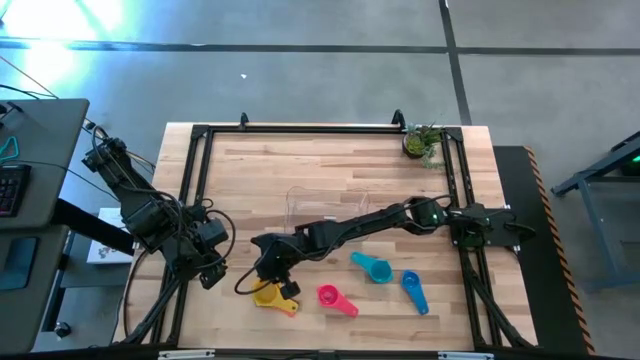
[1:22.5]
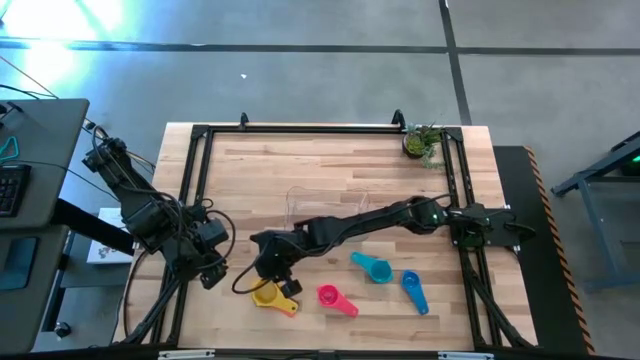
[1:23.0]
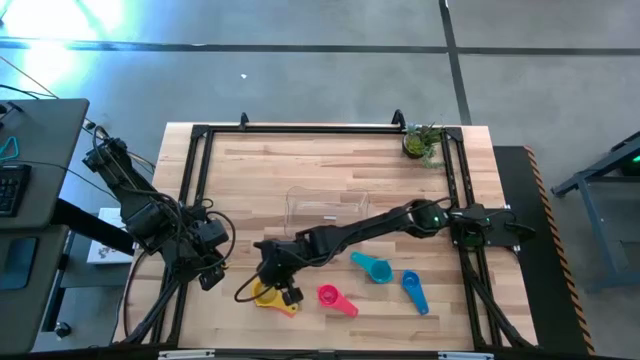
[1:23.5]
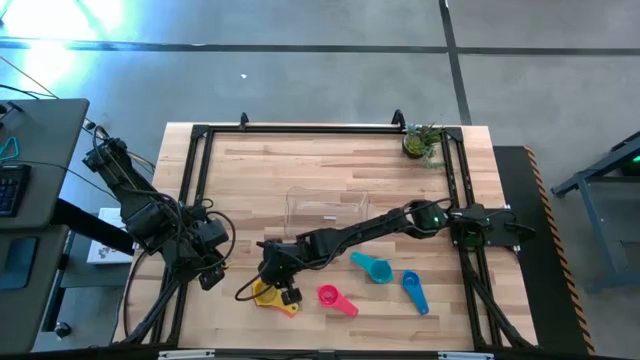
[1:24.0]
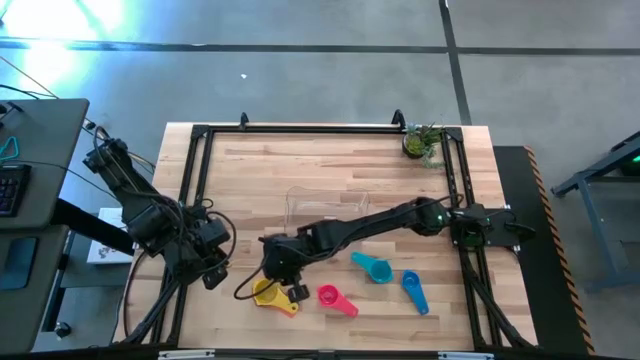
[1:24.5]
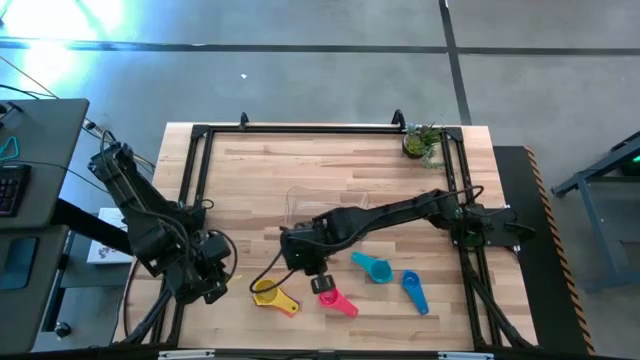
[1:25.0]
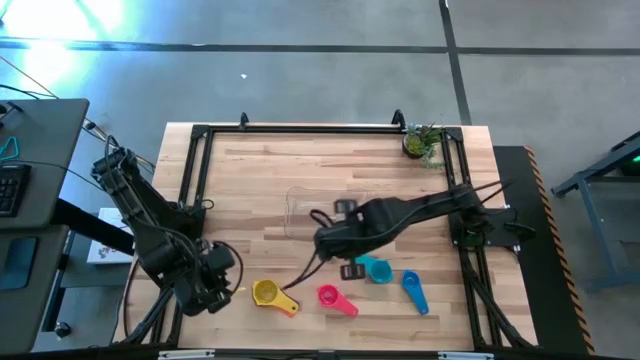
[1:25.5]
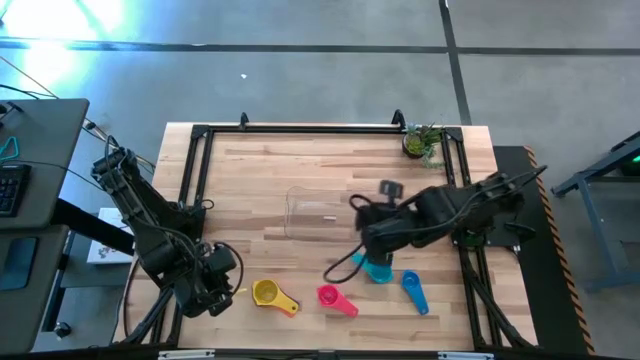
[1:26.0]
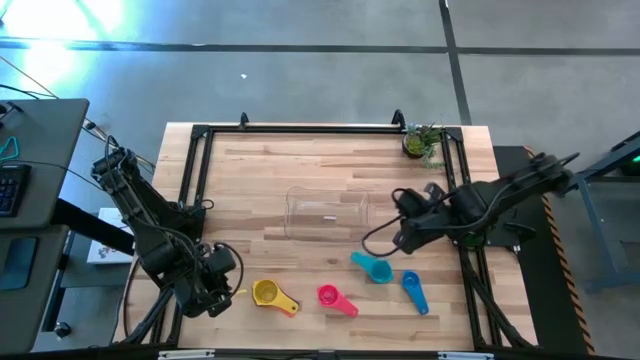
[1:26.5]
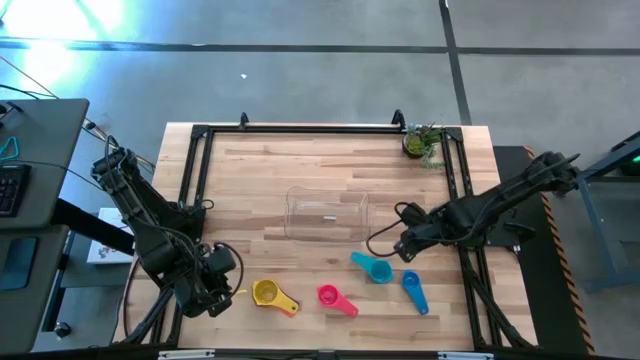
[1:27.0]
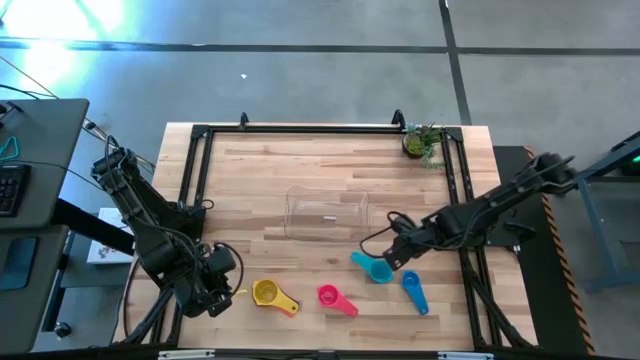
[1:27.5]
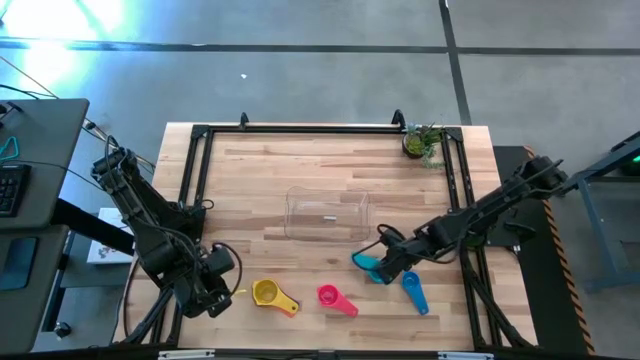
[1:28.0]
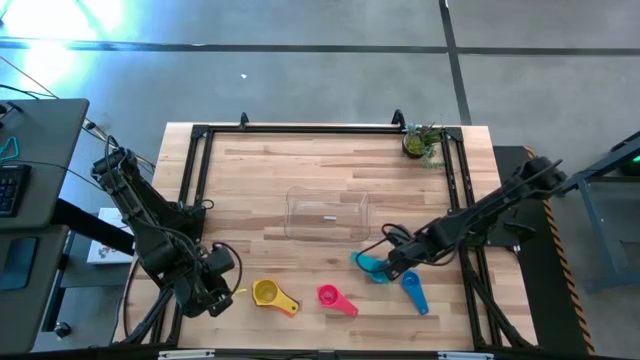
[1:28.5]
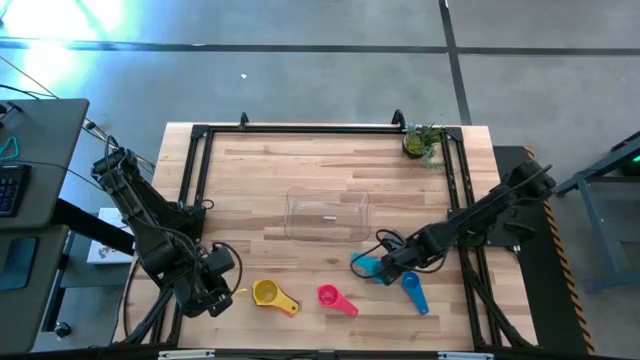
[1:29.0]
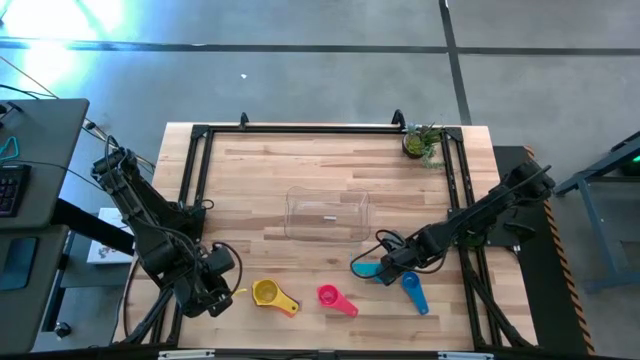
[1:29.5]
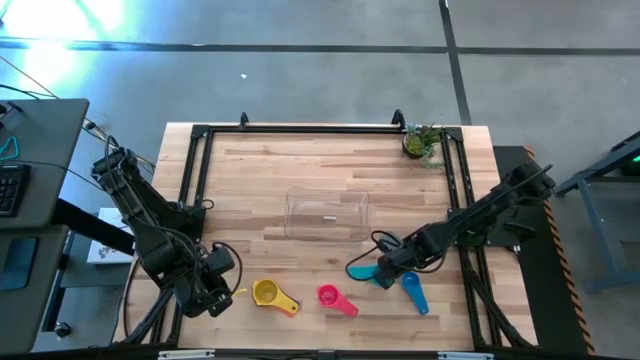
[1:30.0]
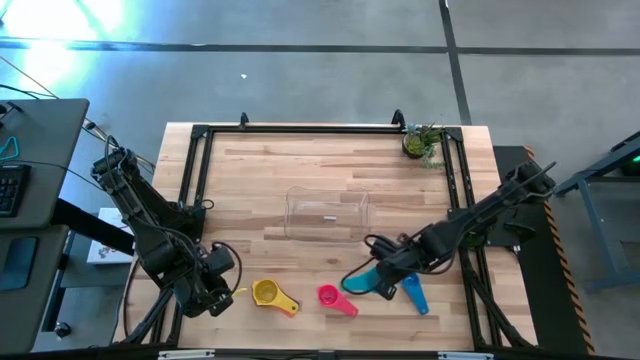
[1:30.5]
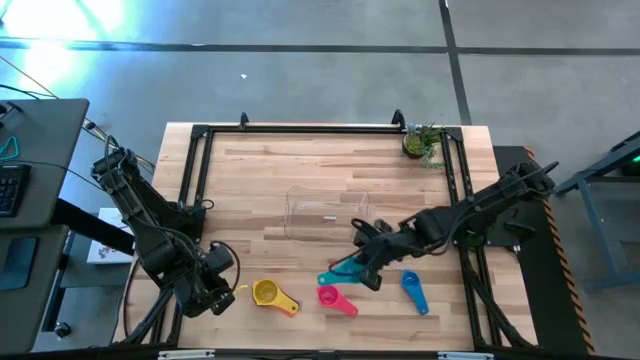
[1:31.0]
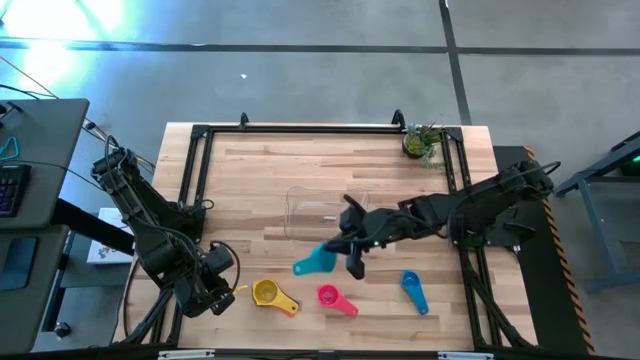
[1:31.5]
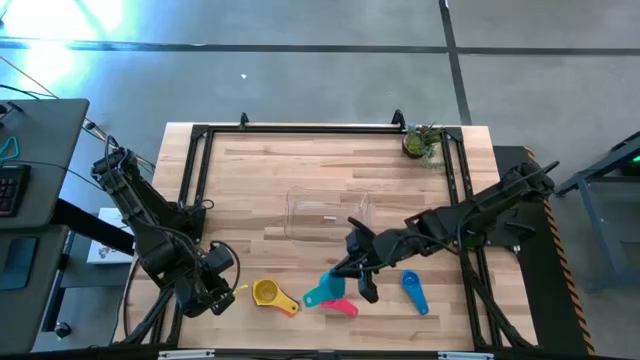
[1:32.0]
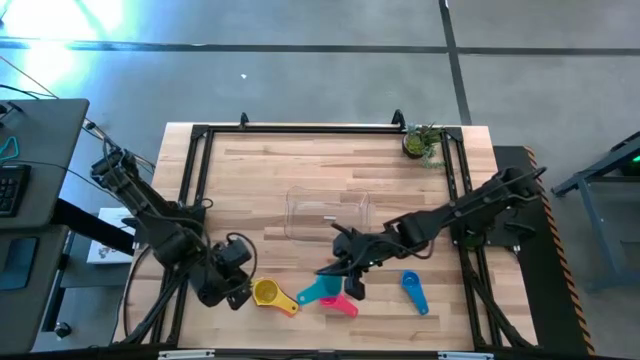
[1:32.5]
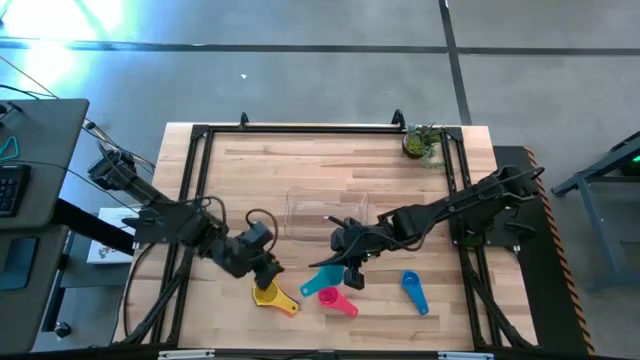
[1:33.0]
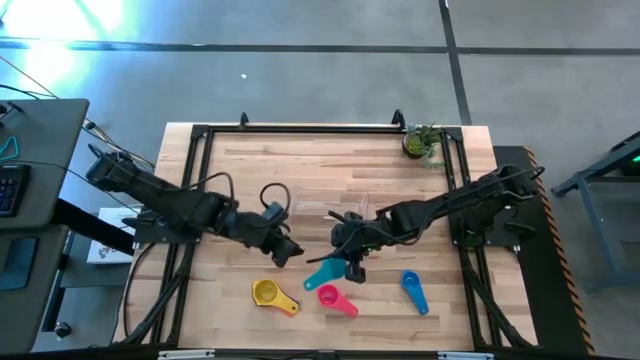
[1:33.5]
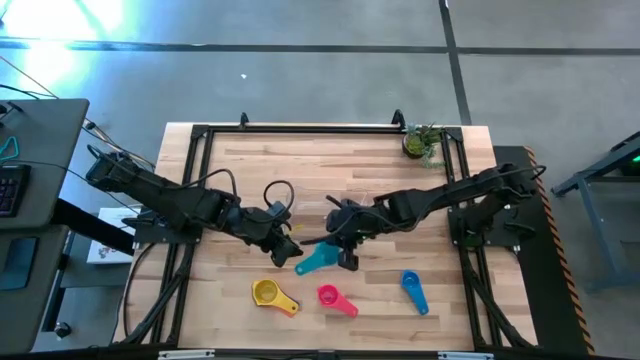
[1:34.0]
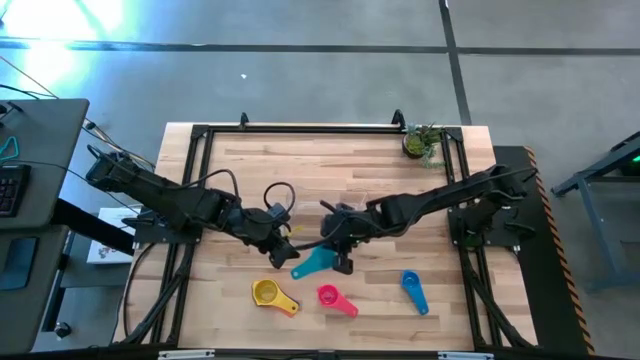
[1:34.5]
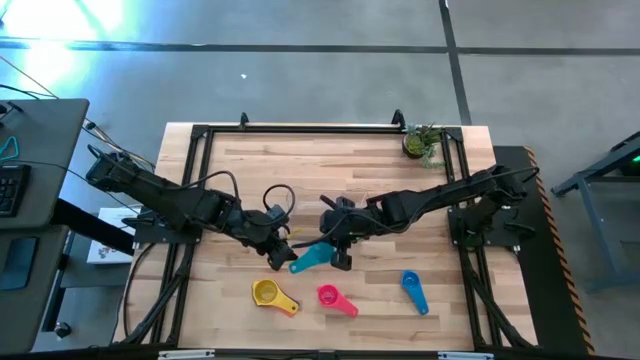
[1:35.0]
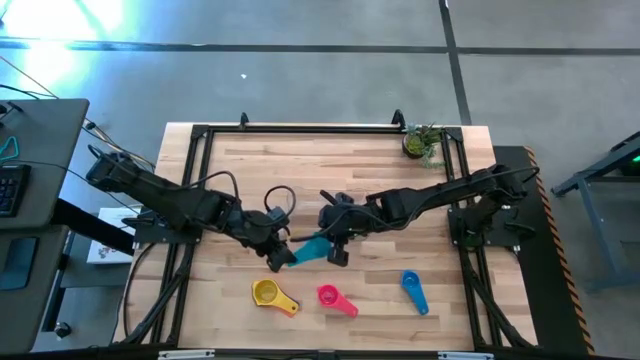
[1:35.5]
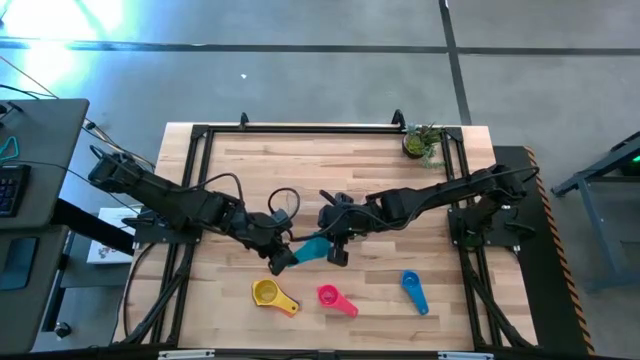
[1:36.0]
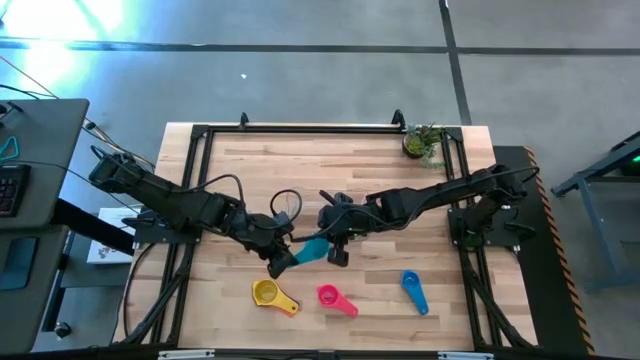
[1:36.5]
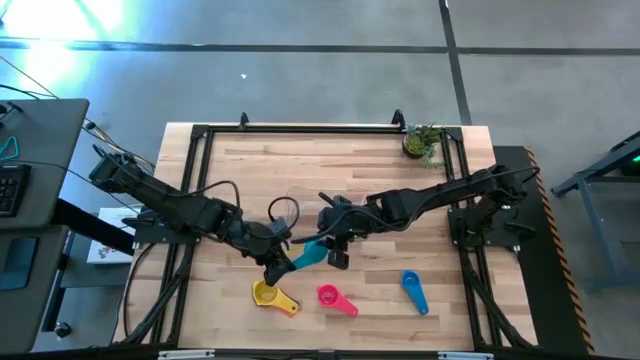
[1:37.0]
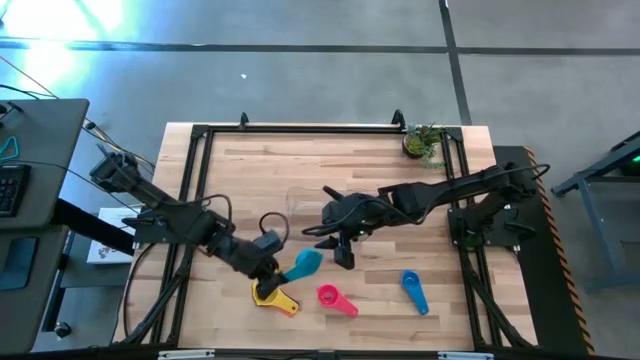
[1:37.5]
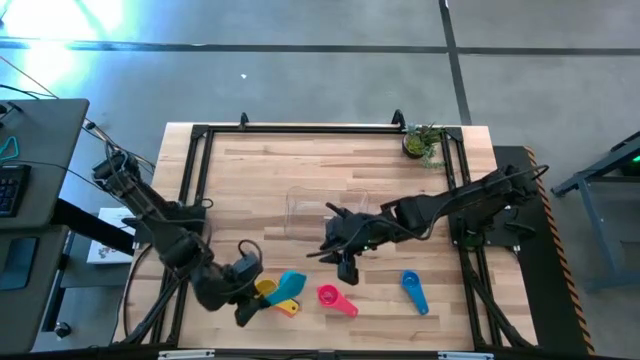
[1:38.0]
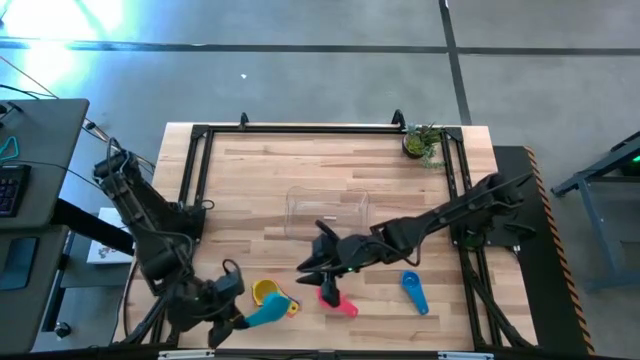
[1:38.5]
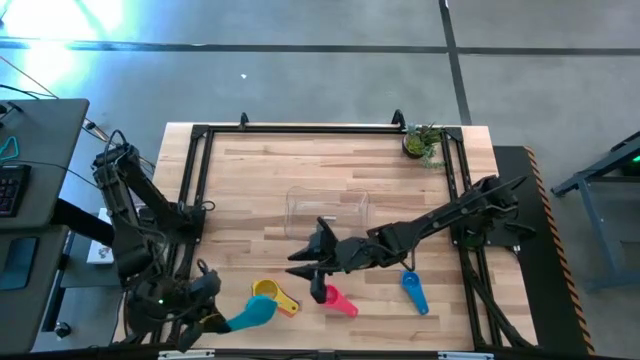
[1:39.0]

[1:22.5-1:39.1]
Task: Nest measuring cups in basket
Stack the light blue measuring cup on top of the yellow measuring cup

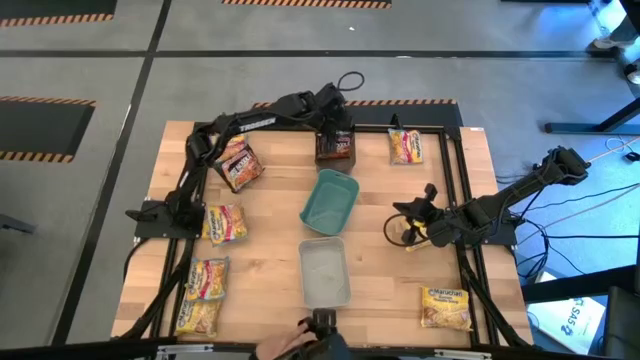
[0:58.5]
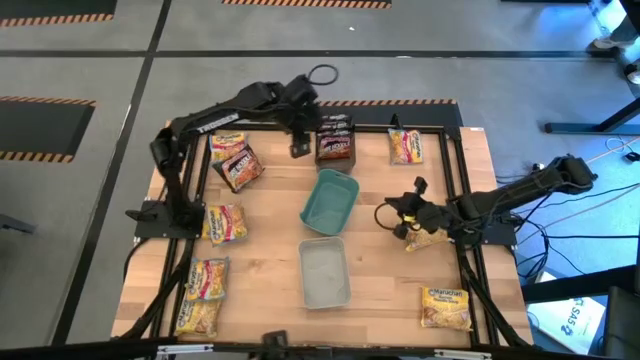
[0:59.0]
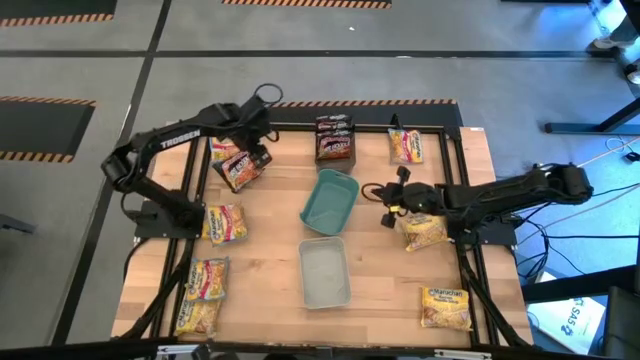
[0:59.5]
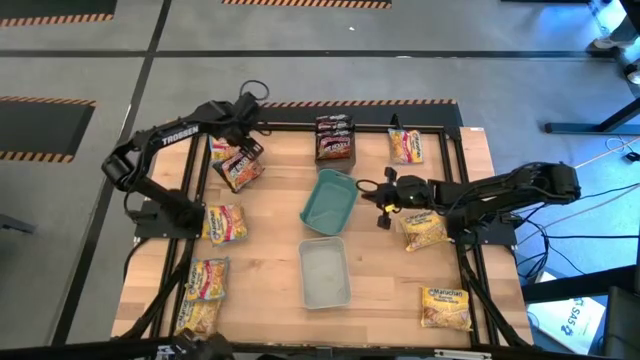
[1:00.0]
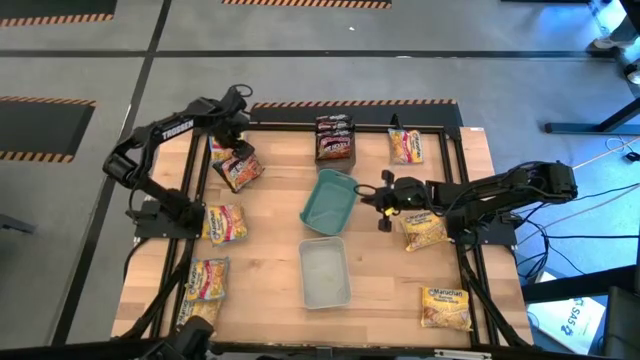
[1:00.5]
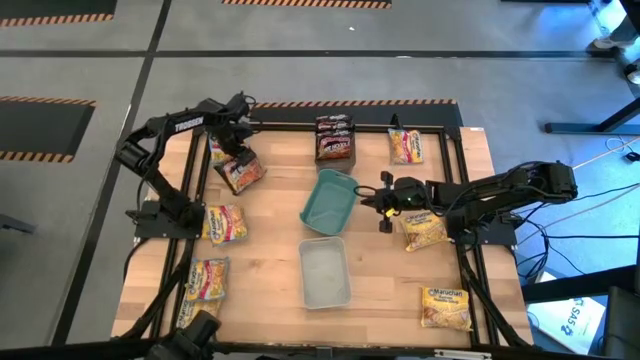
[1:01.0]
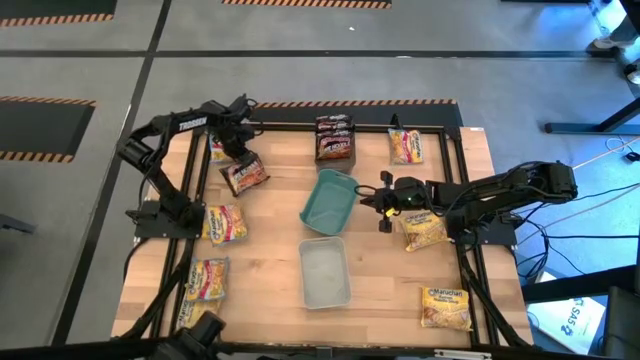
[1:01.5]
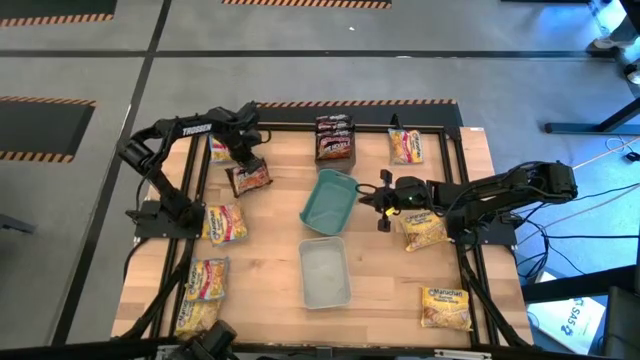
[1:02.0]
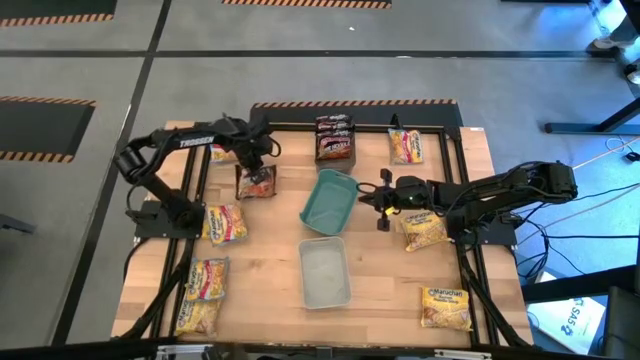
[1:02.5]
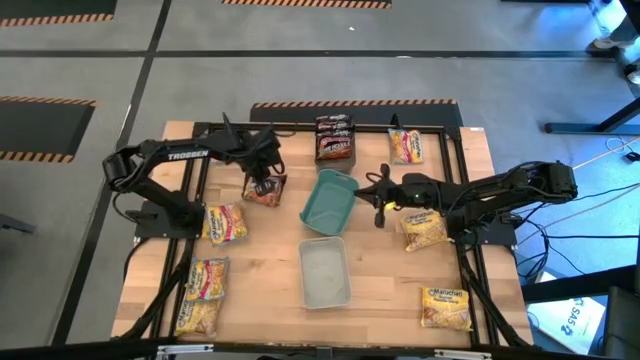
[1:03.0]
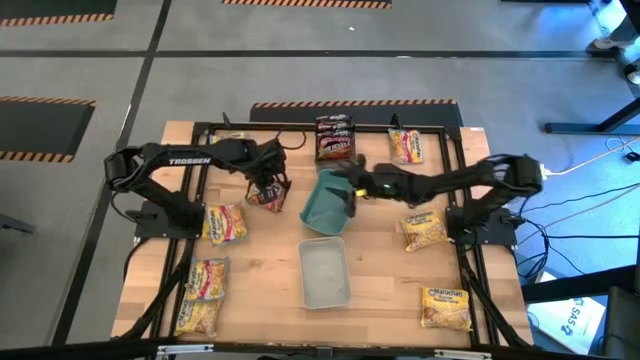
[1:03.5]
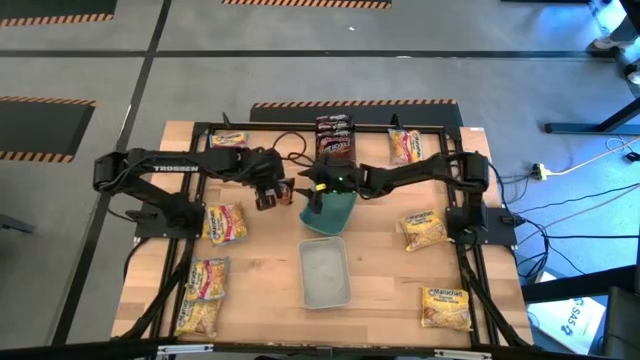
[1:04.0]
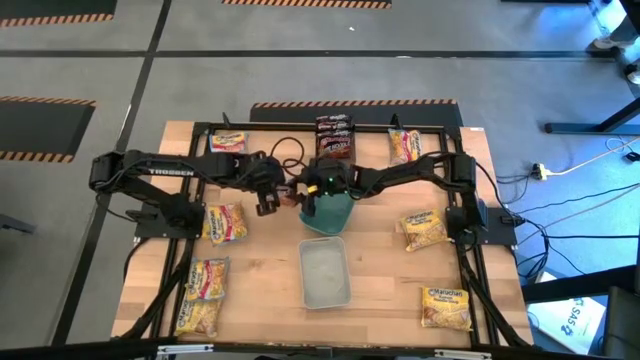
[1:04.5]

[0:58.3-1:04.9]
Task: Sort Maruchan noodles
Put the black noodle pack into the black bin
